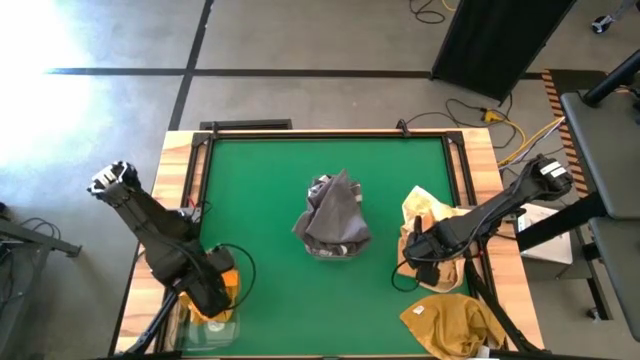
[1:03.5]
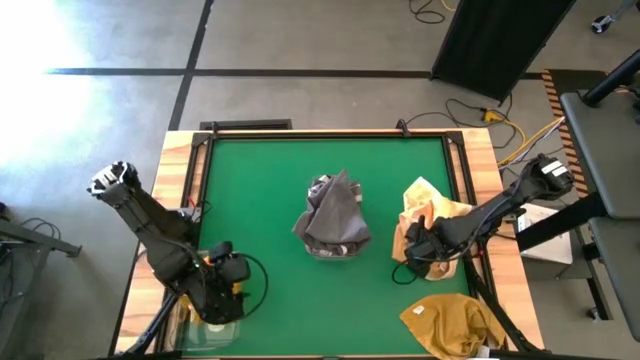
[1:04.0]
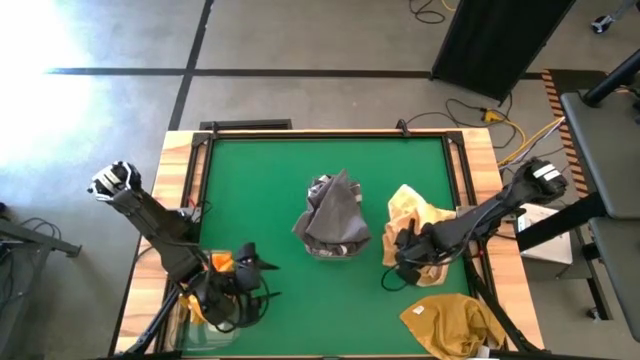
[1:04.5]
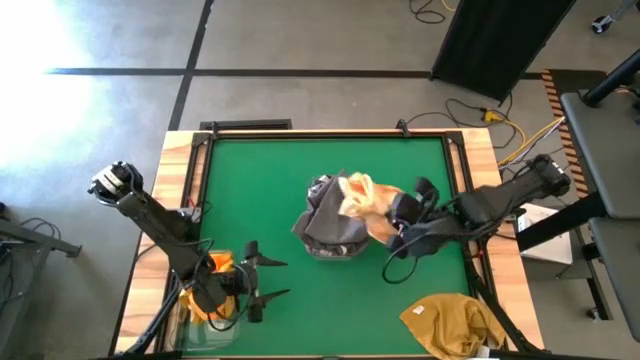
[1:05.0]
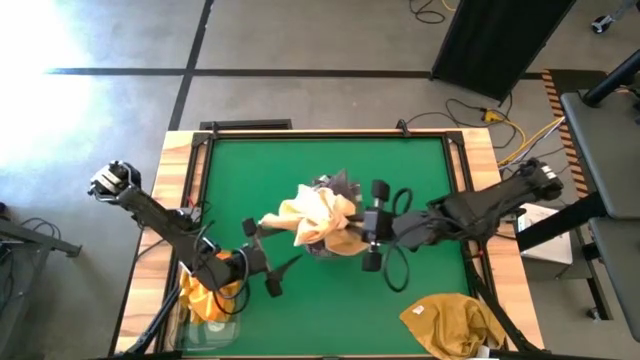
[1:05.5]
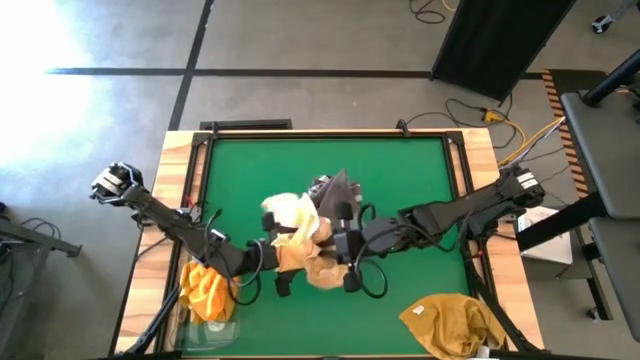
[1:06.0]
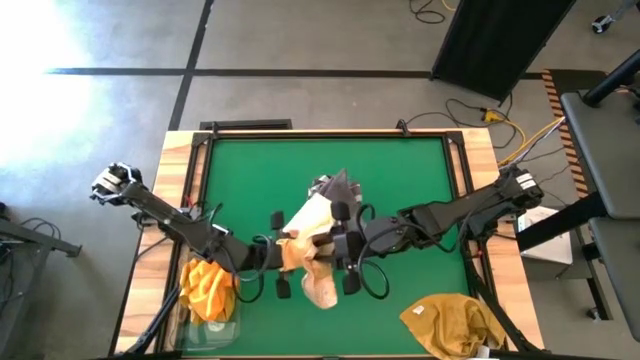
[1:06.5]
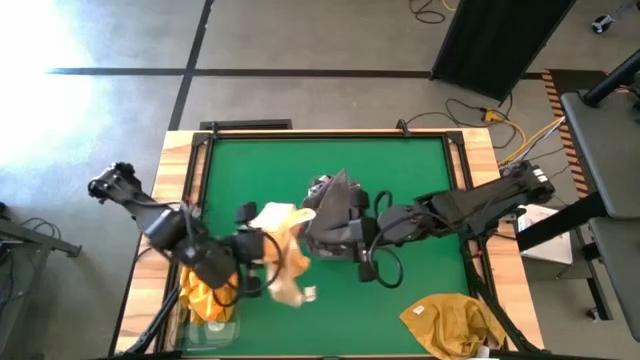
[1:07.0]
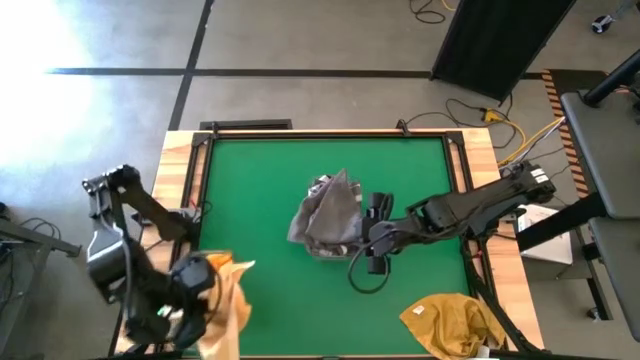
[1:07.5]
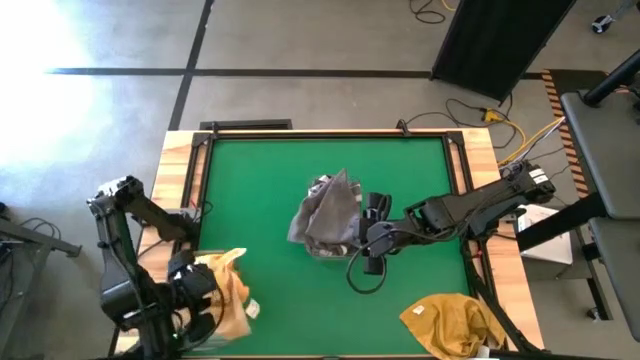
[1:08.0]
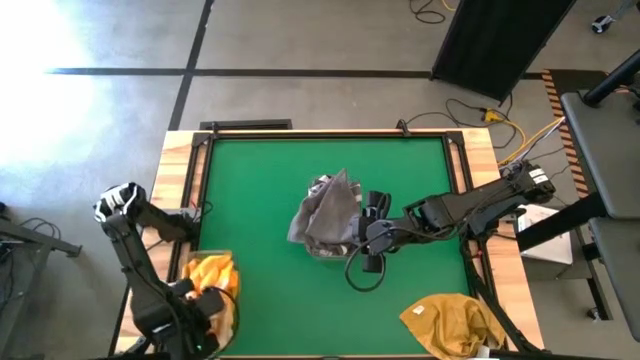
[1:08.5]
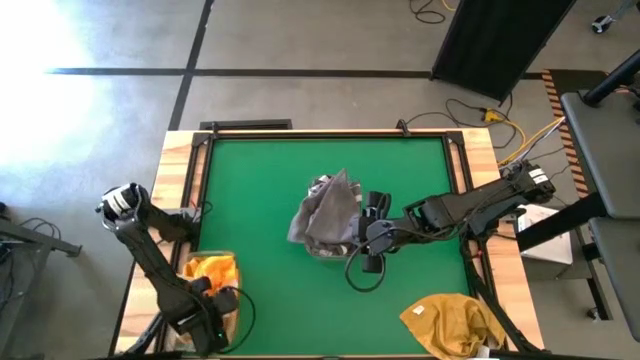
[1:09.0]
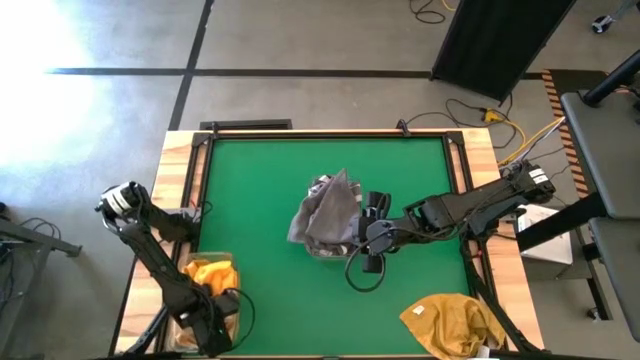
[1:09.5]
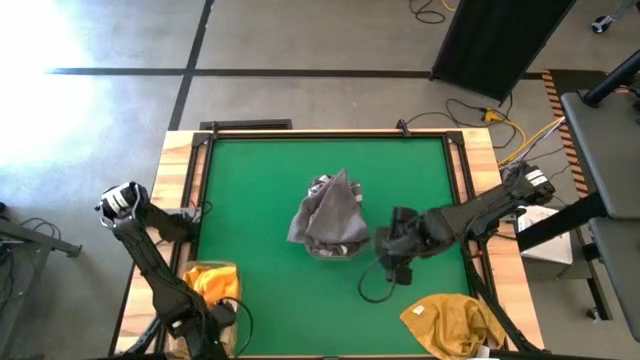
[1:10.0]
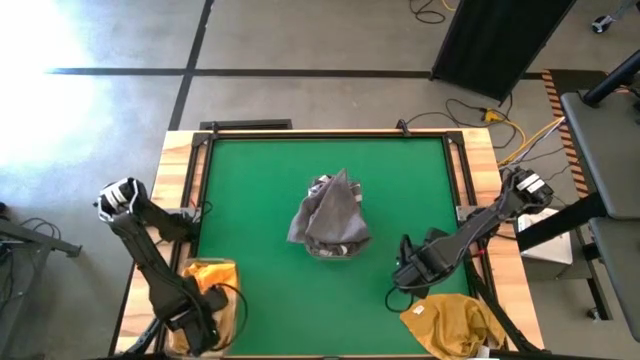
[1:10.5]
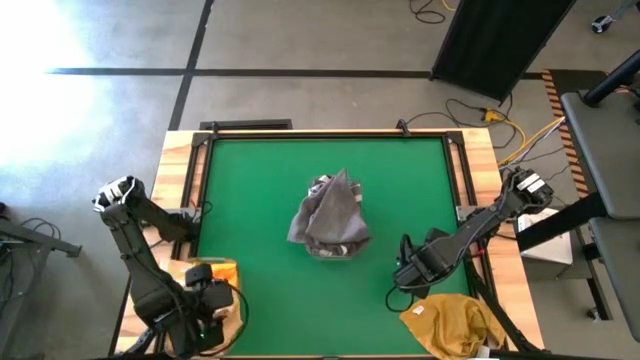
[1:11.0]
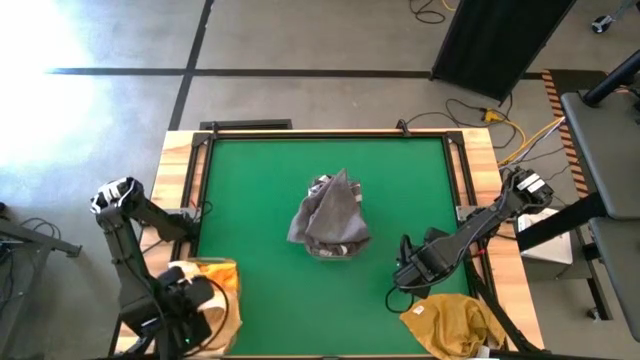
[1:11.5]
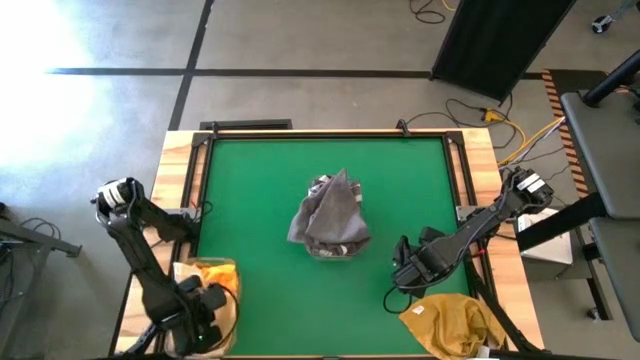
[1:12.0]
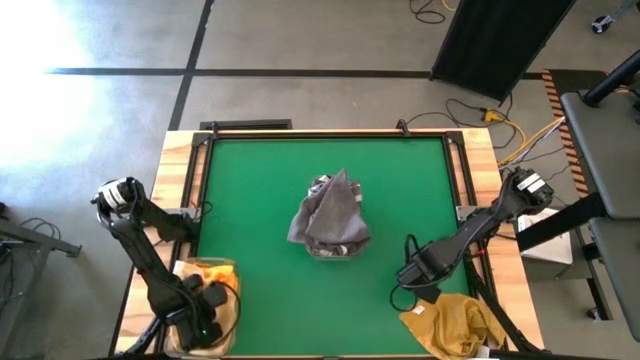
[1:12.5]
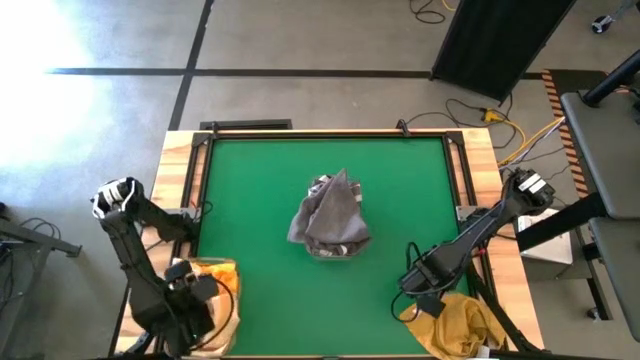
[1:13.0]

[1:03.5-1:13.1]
Task: Sort towels by color in basket
Put the yellow checkered towel into the bottom transparent bin

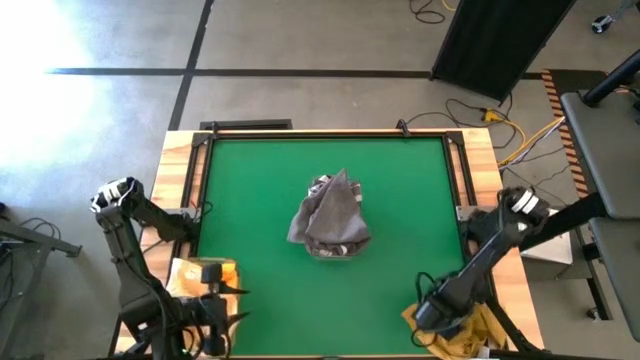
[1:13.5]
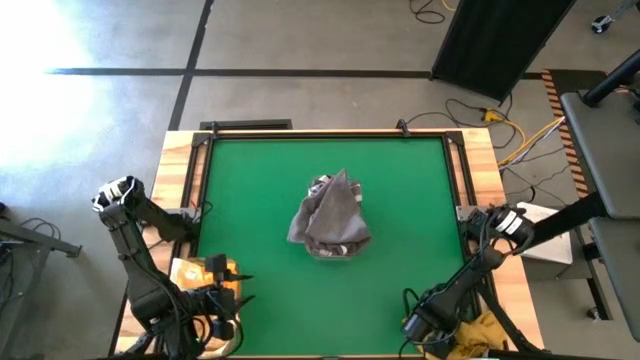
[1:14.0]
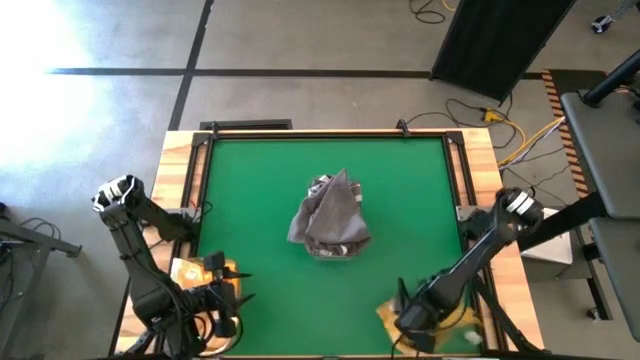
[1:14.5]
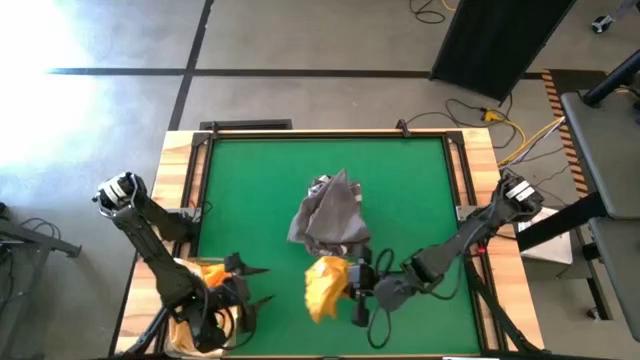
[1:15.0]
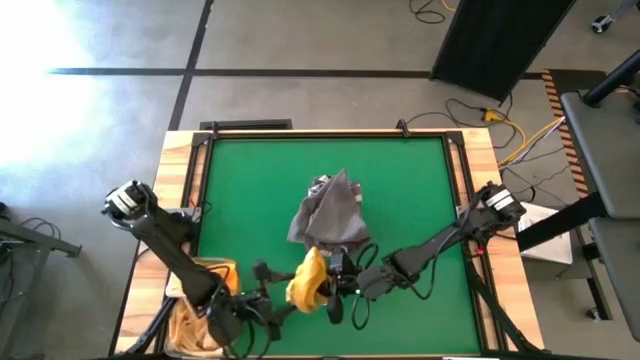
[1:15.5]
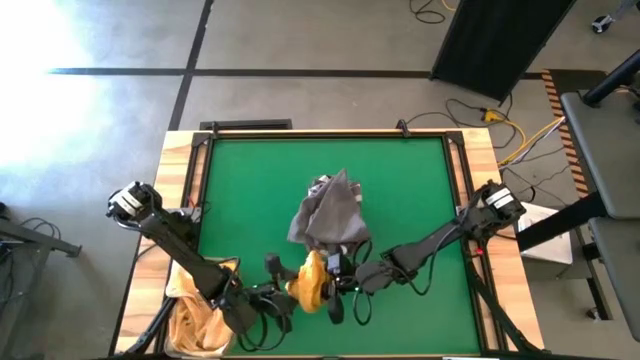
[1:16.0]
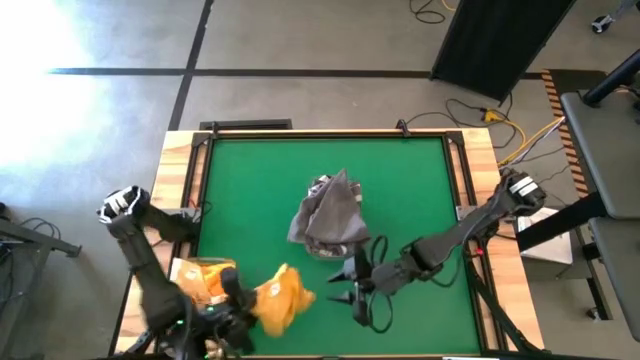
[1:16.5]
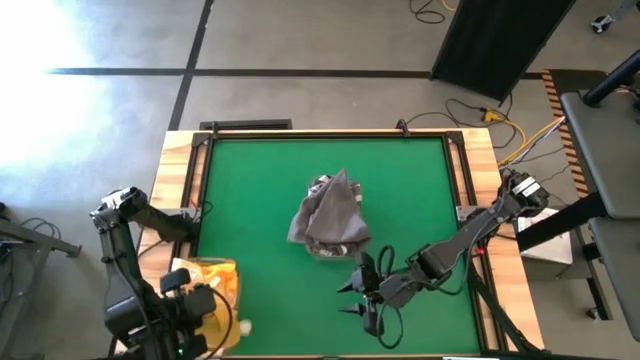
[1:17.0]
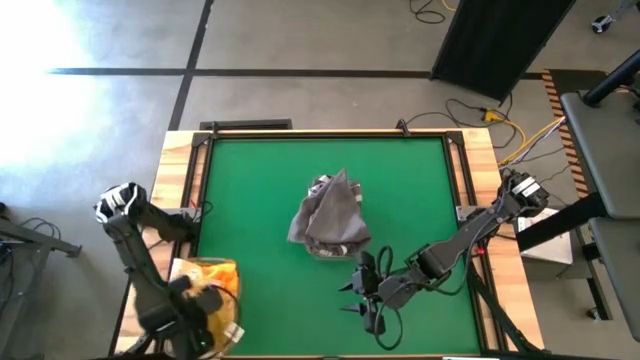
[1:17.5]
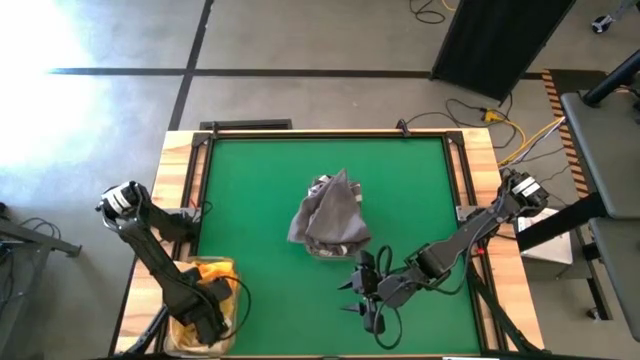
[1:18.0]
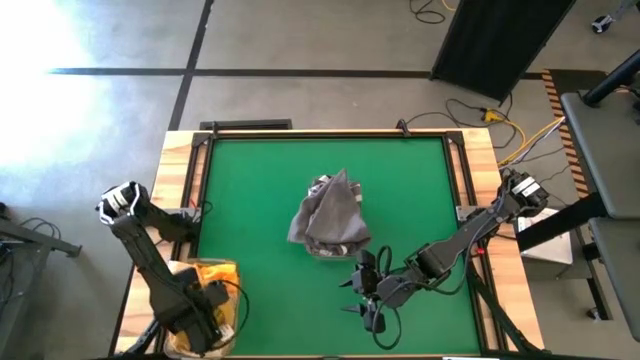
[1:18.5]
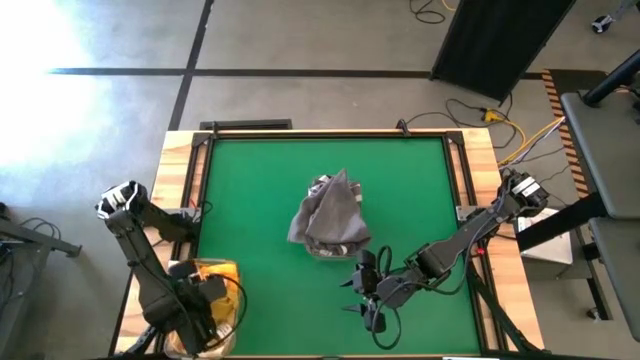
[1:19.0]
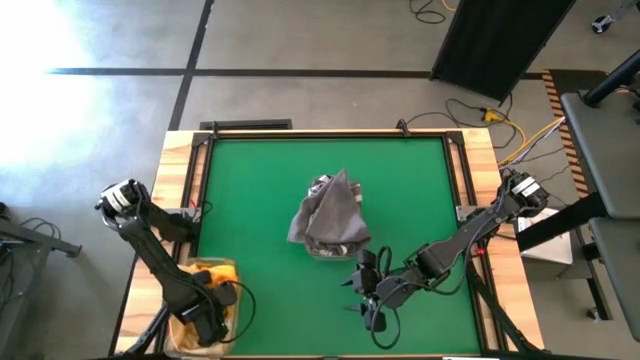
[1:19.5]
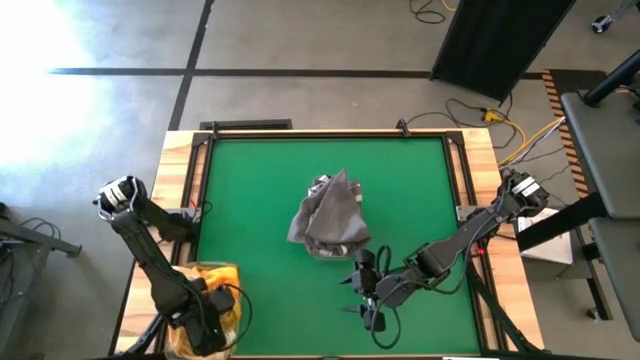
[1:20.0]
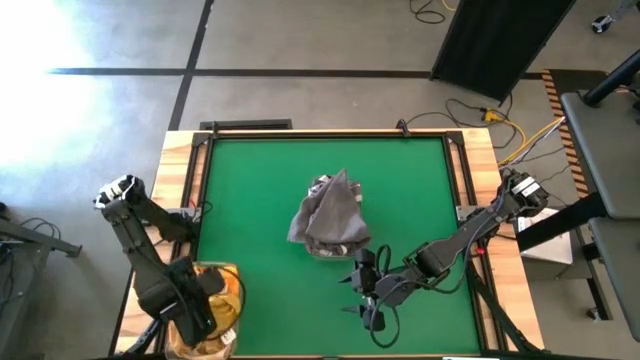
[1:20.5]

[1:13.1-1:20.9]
Put the yellow towel into the bottom transparent bin

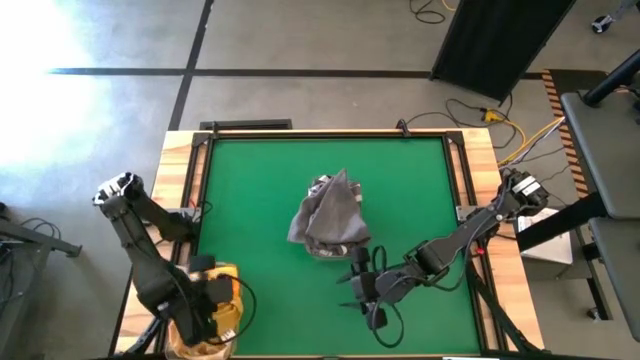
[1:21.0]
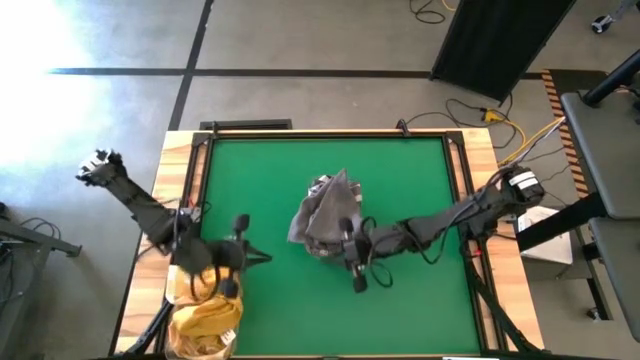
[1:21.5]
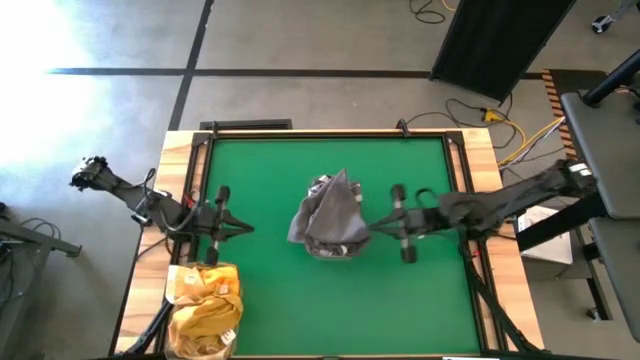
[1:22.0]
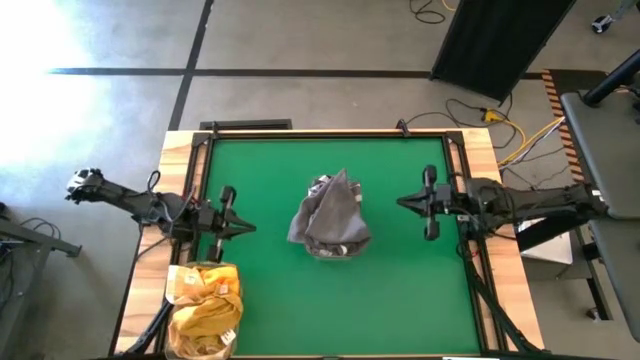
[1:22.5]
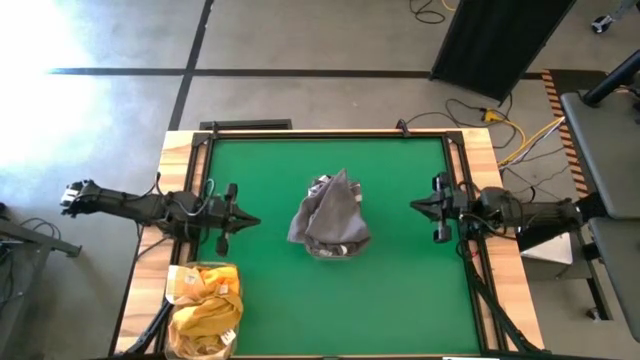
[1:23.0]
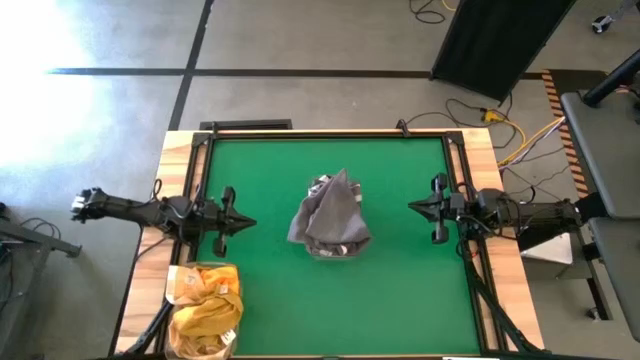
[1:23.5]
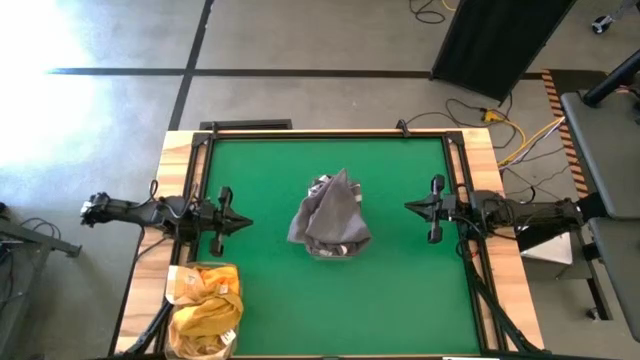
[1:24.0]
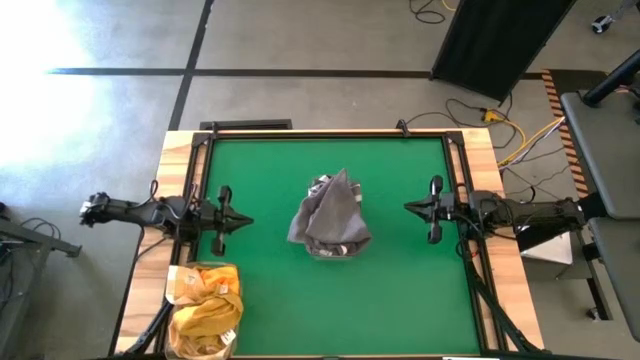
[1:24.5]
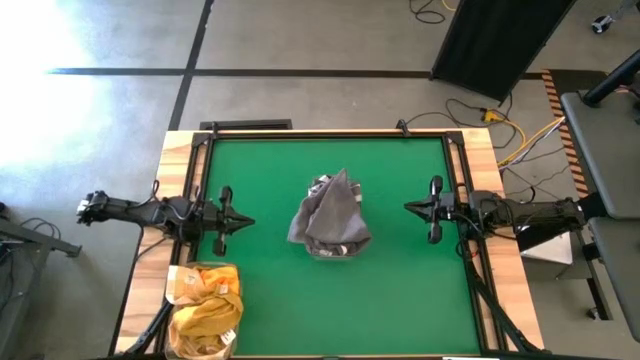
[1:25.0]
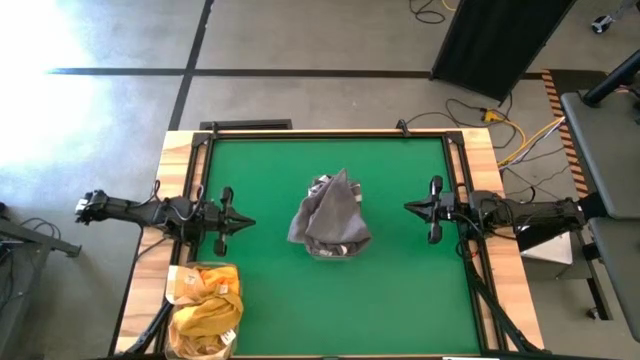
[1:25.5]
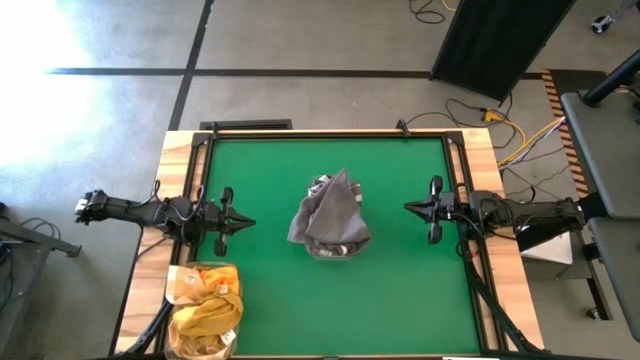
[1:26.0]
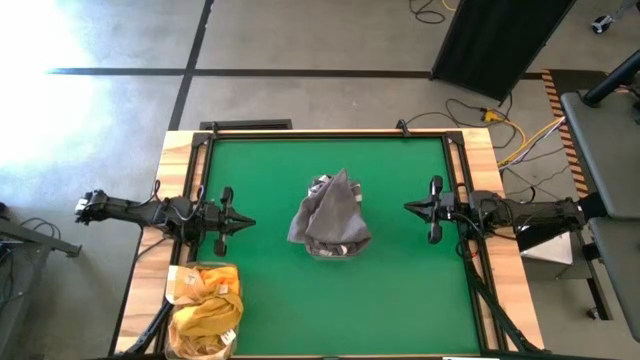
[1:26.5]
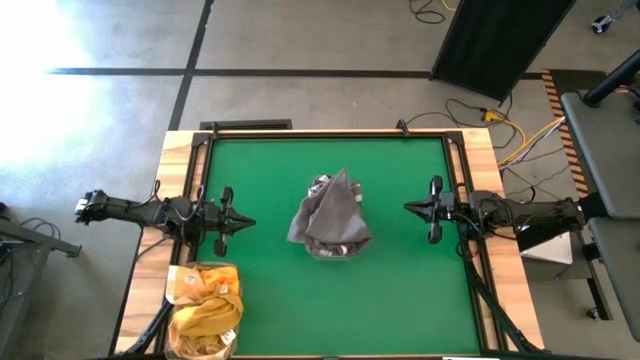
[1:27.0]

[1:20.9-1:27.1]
Return to Home Position
